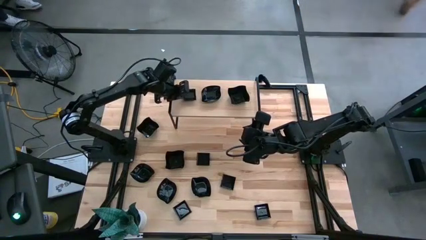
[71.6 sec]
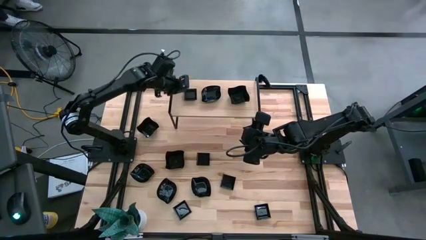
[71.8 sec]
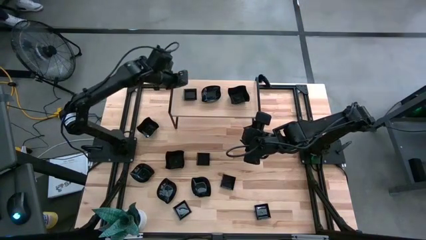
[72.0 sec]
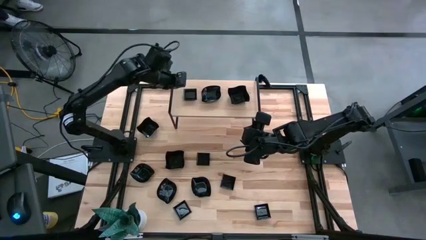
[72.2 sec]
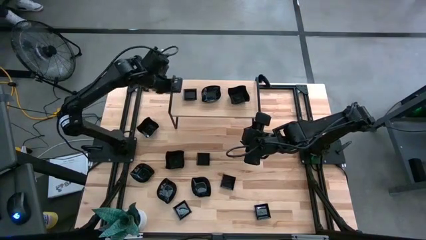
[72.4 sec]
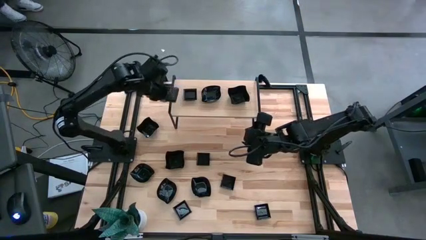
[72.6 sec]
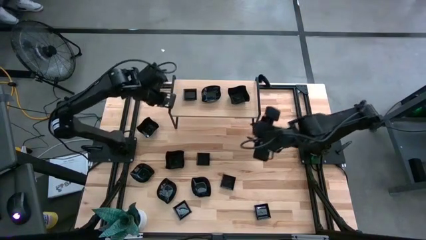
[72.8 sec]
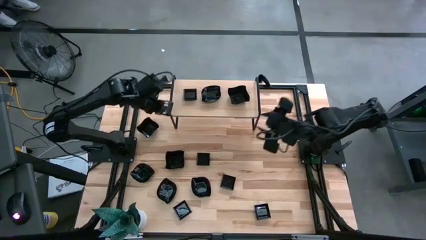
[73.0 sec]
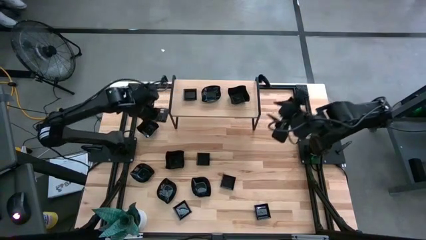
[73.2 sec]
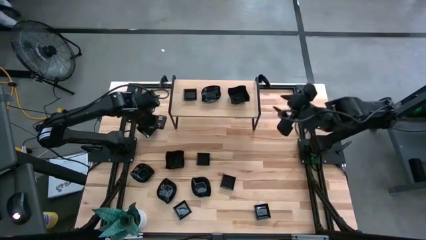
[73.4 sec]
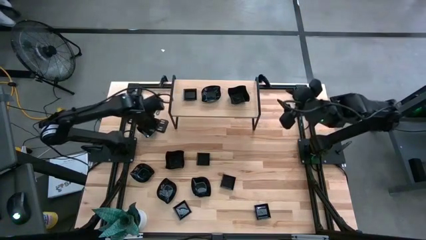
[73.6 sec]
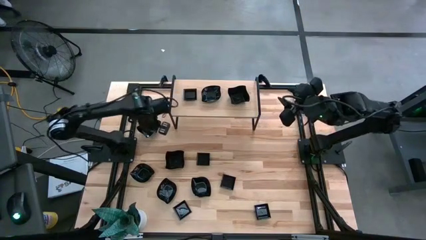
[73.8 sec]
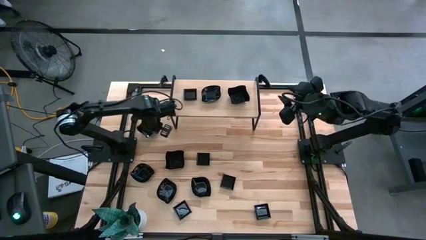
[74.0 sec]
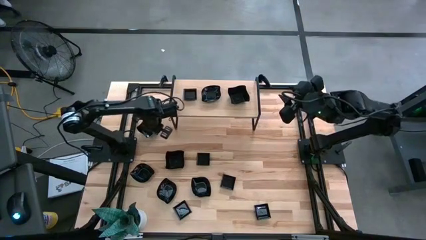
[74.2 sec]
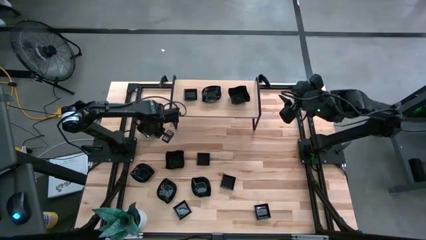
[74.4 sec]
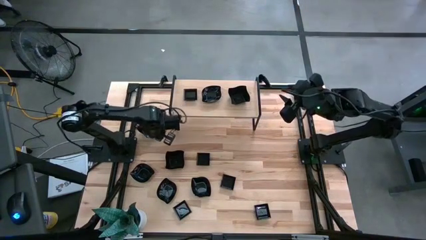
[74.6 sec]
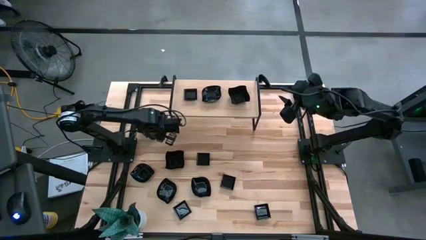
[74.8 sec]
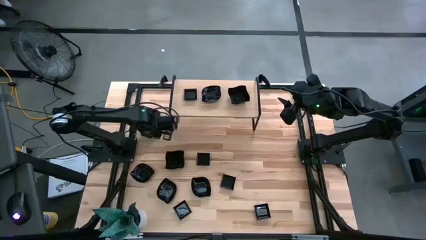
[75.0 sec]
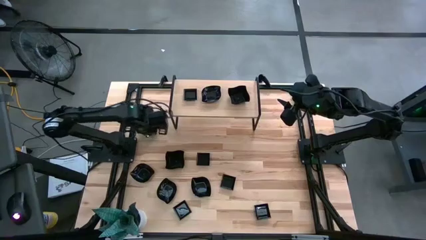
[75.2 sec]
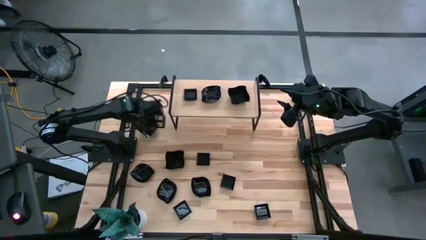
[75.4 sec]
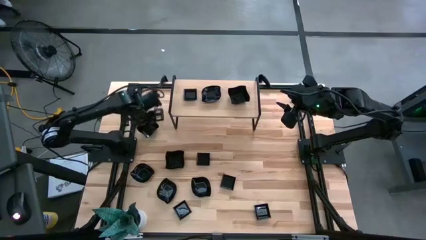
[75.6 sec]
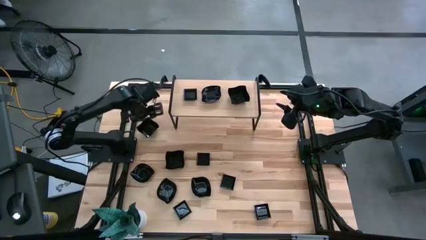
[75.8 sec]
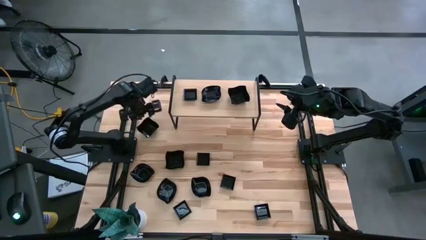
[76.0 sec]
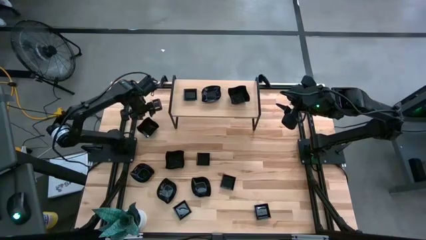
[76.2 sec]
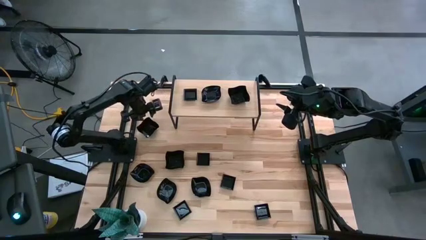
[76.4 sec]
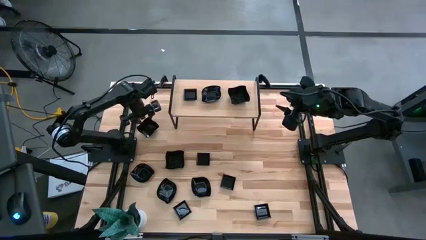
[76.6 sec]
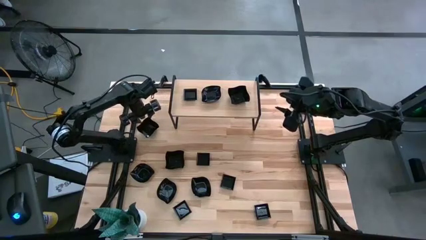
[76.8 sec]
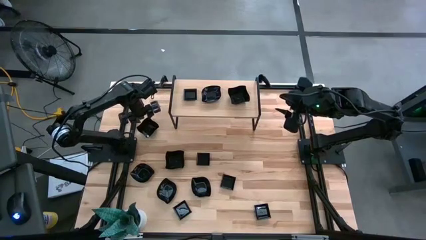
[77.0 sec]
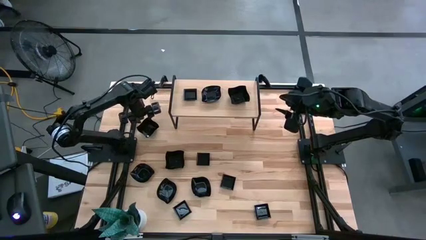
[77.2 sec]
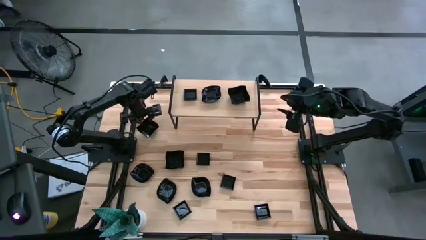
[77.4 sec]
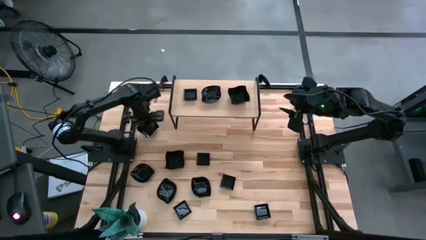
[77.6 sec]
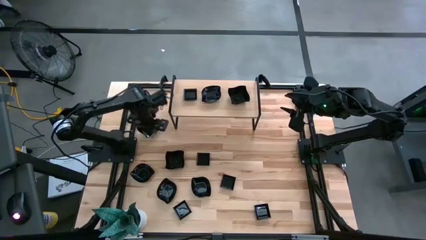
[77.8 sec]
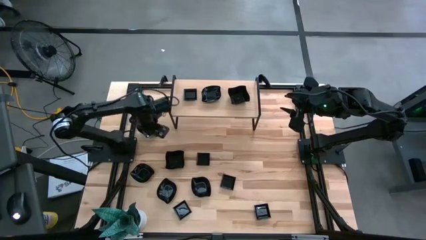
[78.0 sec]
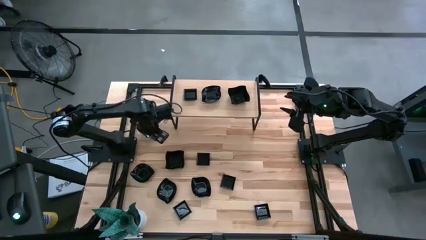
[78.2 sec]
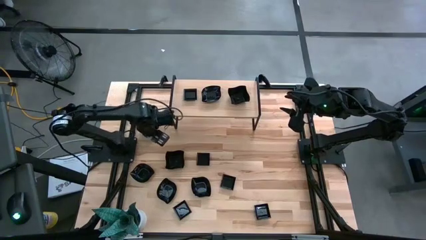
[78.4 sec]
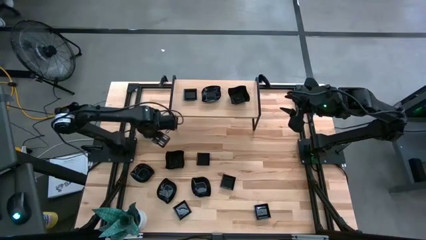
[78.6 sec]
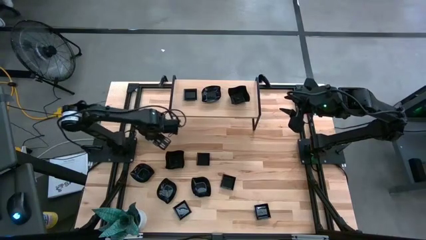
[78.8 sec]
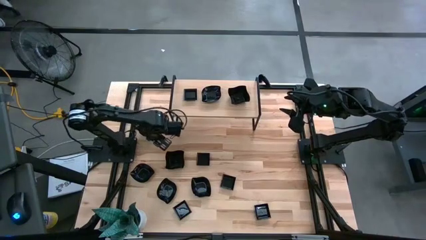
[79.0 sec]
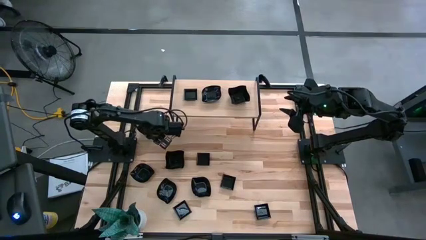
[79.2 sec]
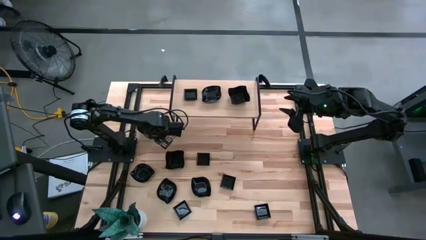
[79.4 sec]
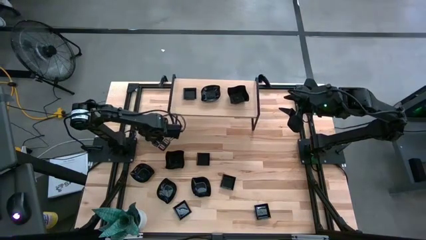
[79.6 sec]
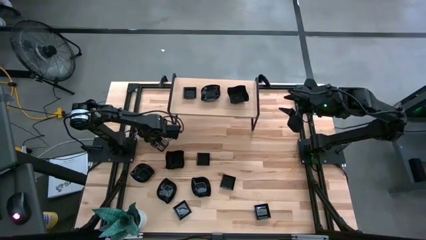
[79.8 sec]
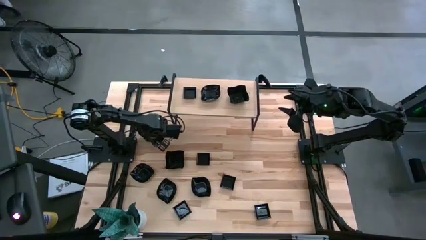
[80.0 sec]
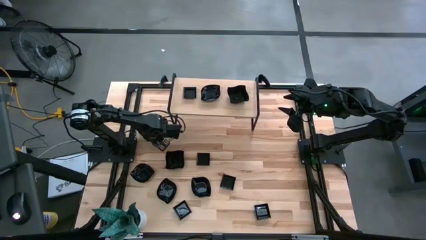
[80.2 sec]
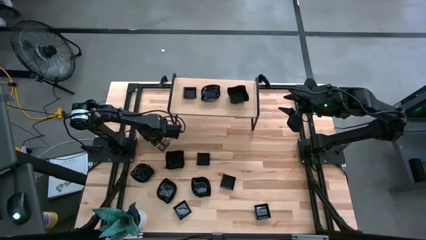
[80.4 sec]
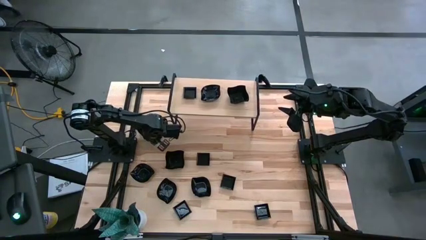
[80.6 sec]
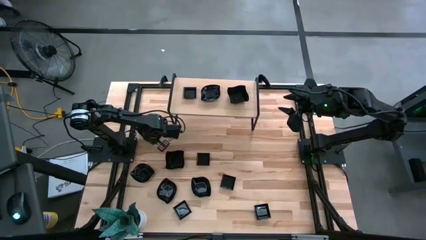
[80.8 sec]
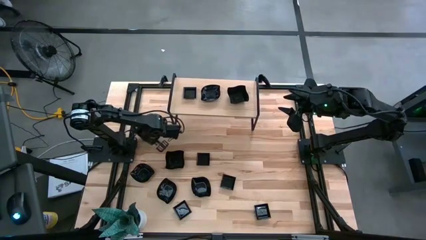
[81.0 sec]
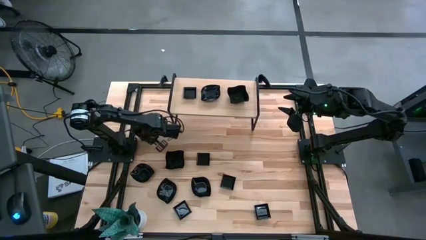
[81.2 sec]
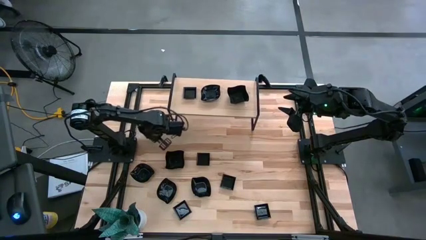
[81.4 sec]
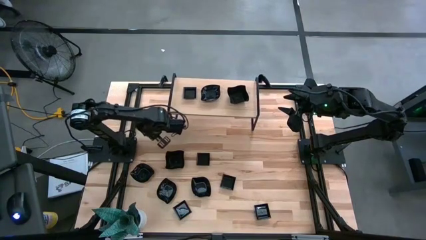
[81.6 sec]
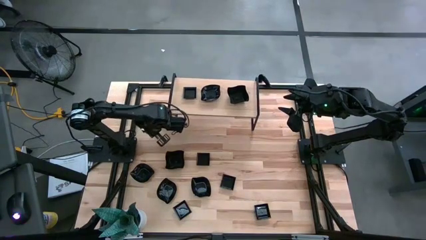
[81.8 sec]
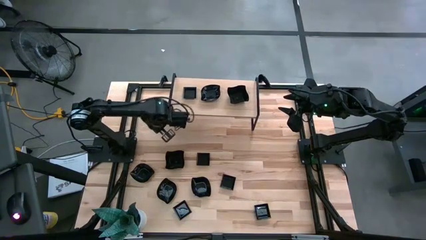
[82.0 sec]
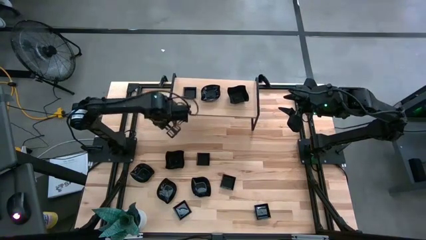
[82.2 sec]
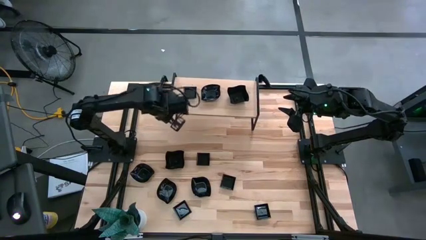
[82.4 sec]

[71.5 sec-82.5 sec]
Task: Pick & Place Mini shaped plates
Stack the square-shaped plate on the square-shaped plate
